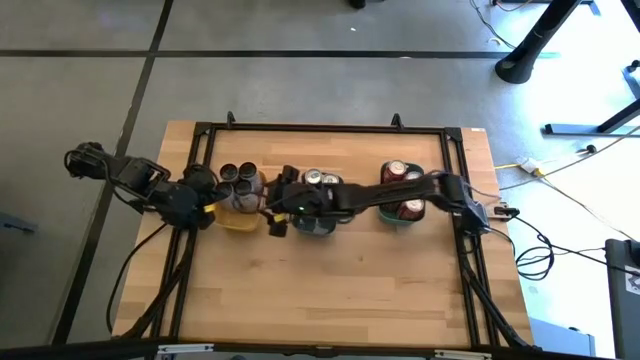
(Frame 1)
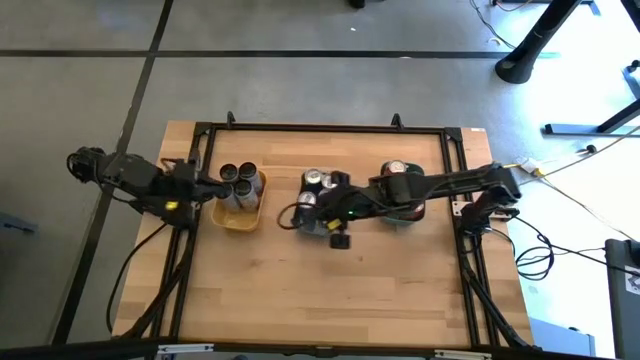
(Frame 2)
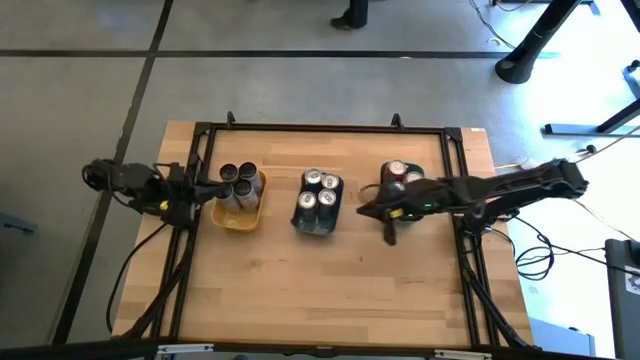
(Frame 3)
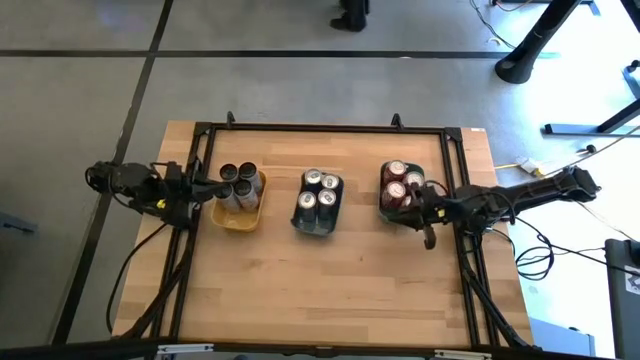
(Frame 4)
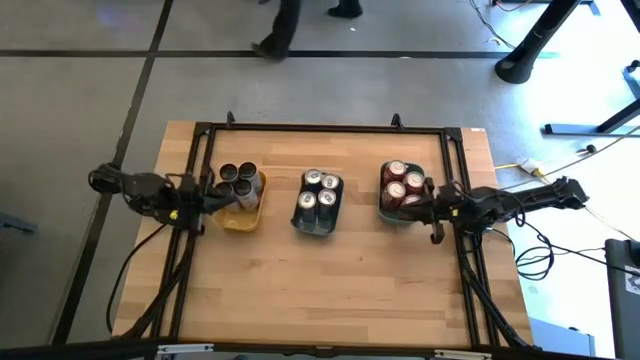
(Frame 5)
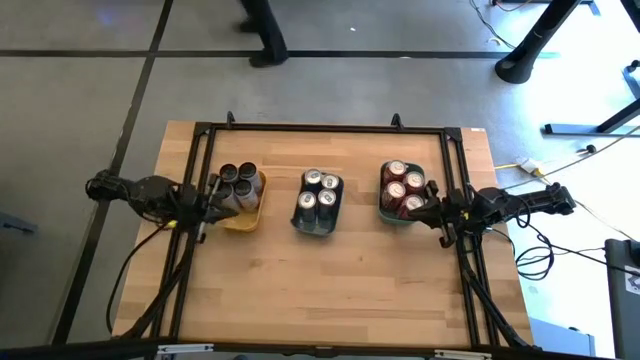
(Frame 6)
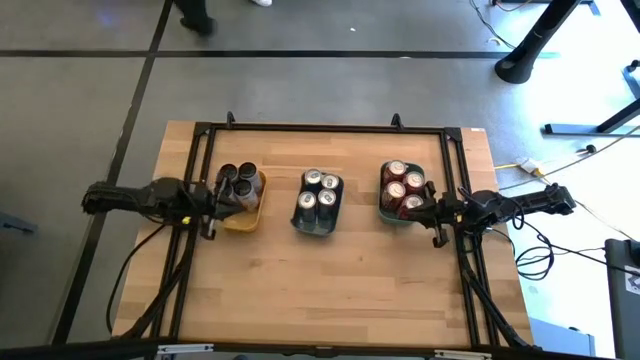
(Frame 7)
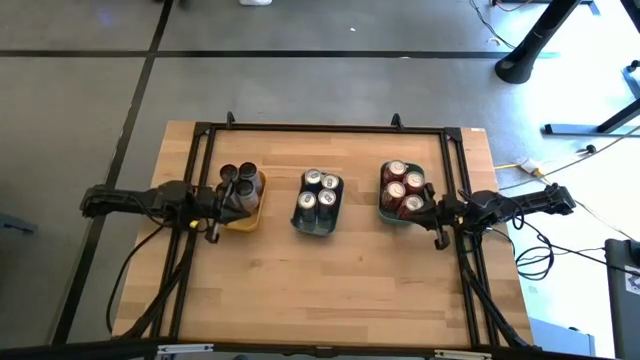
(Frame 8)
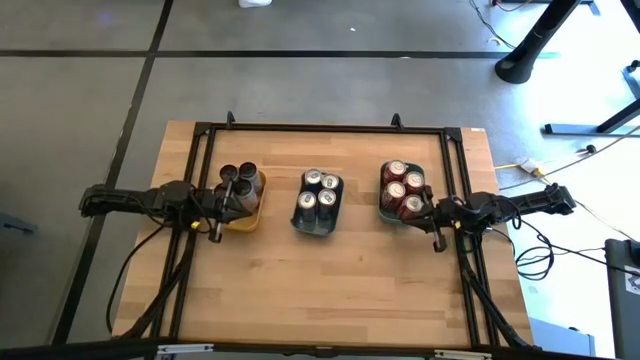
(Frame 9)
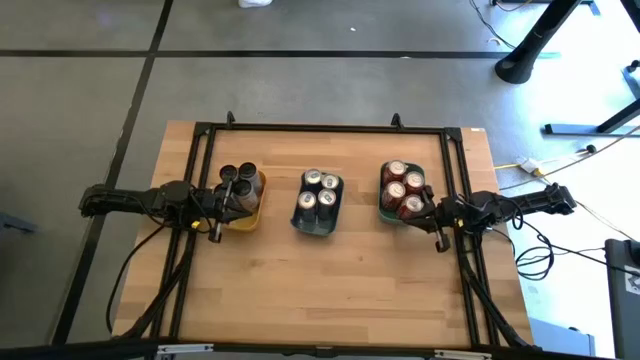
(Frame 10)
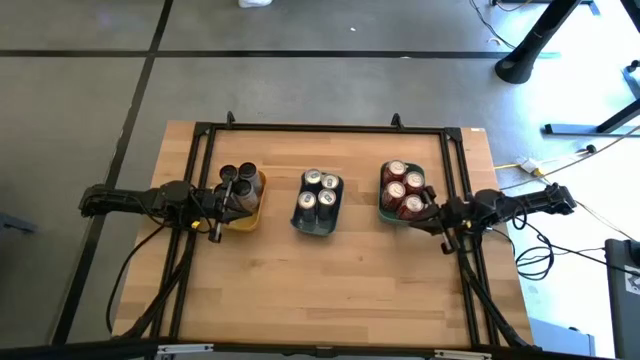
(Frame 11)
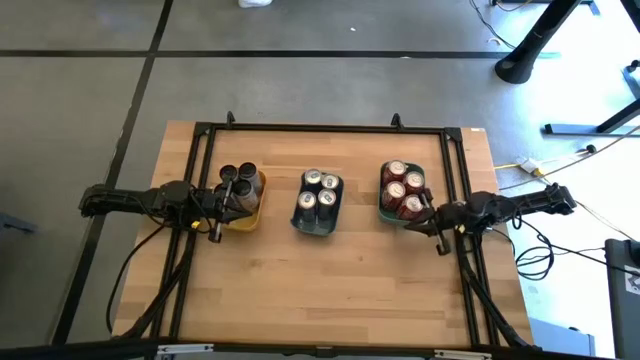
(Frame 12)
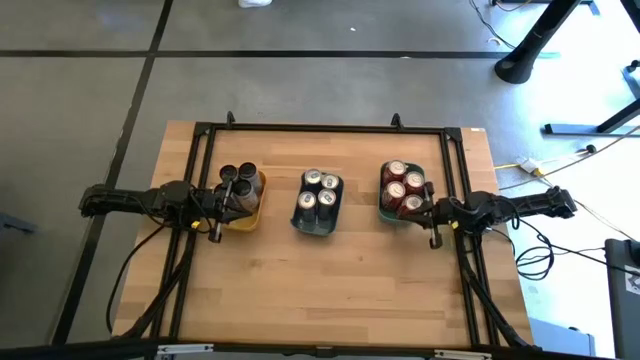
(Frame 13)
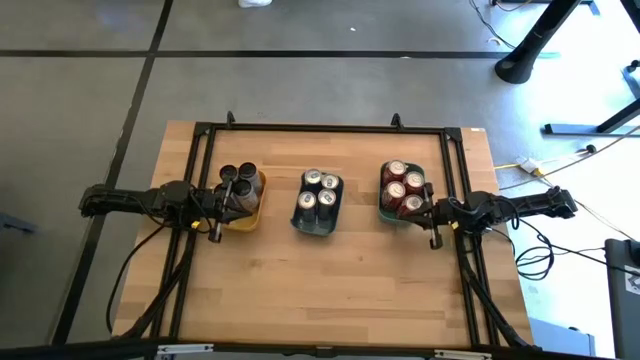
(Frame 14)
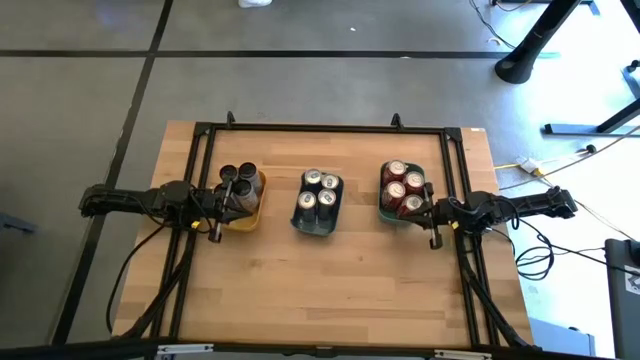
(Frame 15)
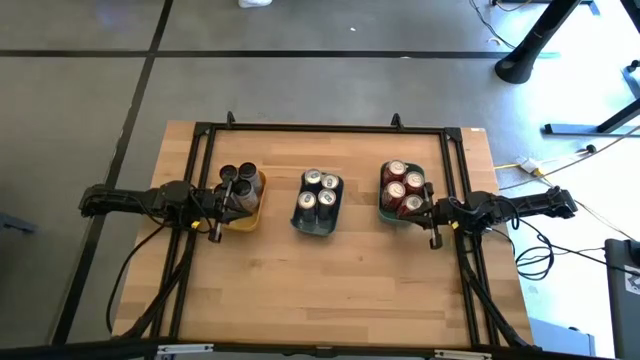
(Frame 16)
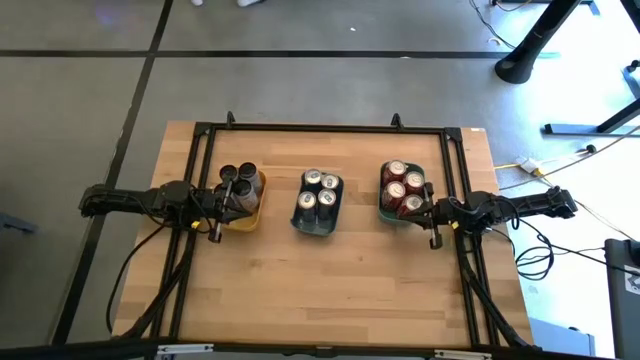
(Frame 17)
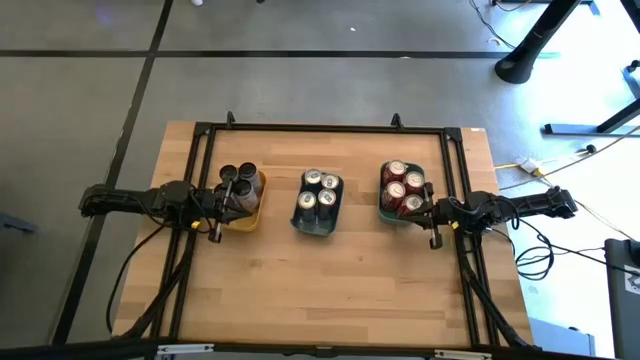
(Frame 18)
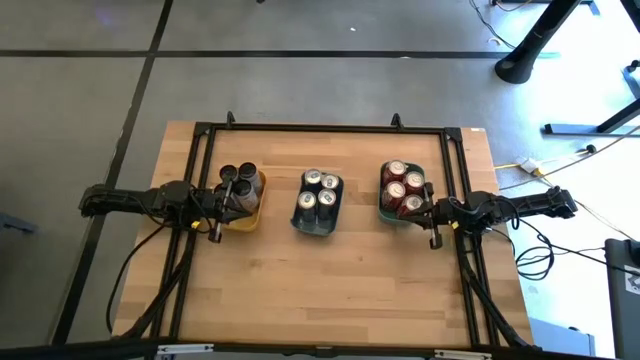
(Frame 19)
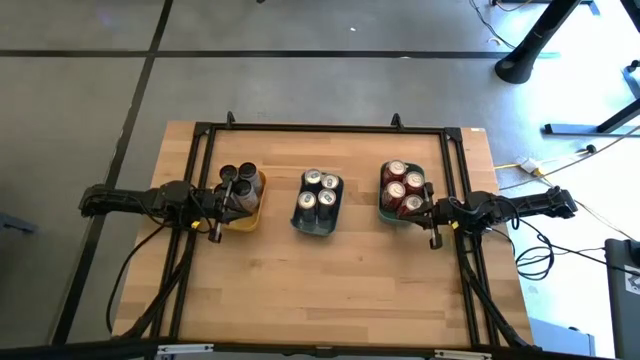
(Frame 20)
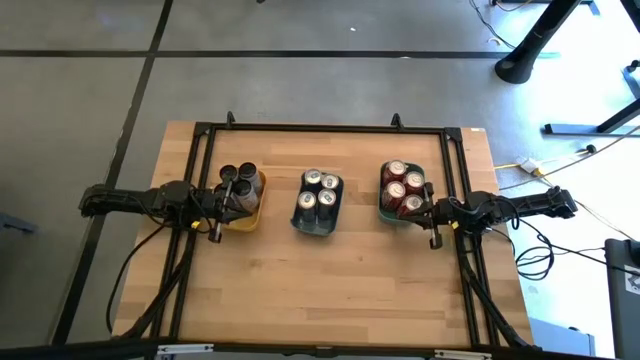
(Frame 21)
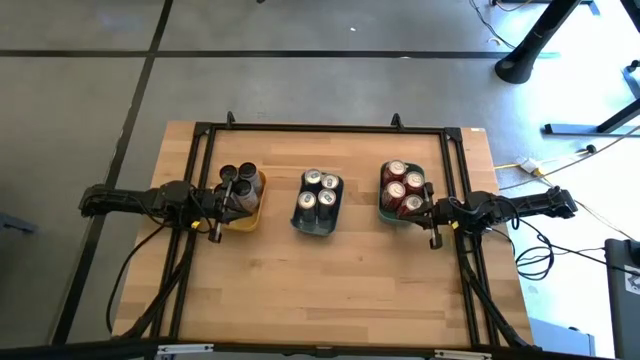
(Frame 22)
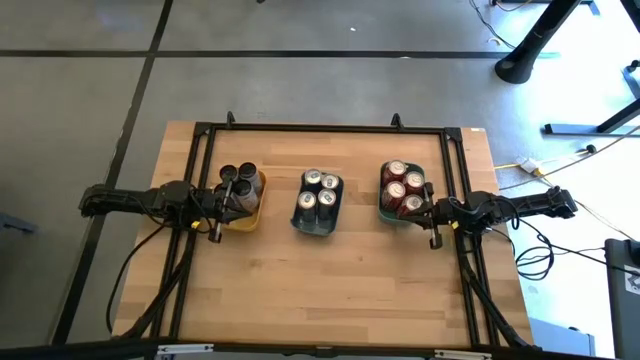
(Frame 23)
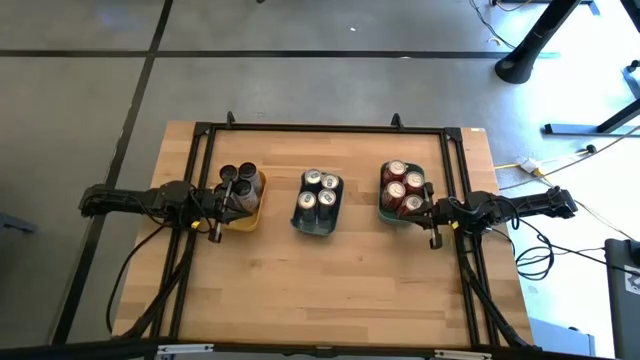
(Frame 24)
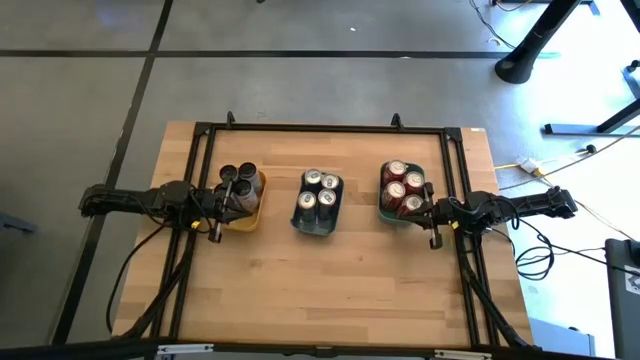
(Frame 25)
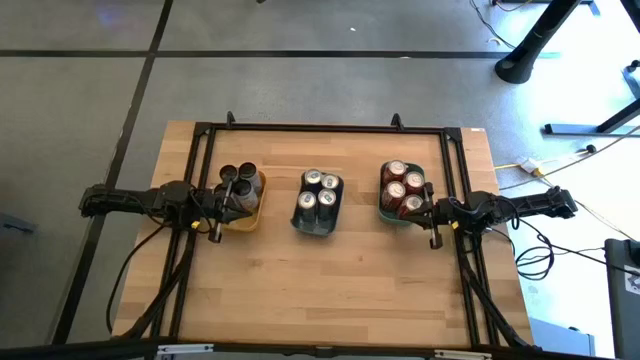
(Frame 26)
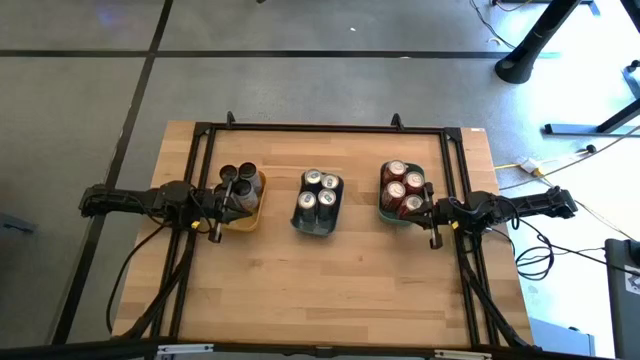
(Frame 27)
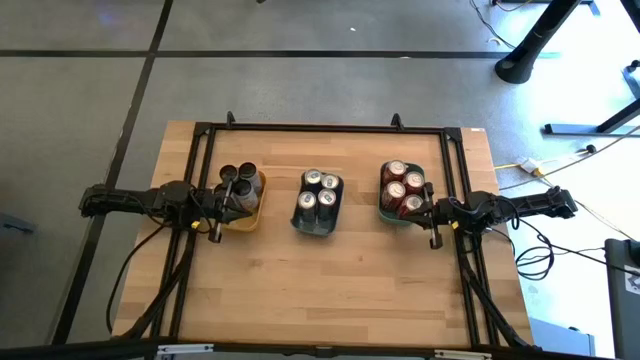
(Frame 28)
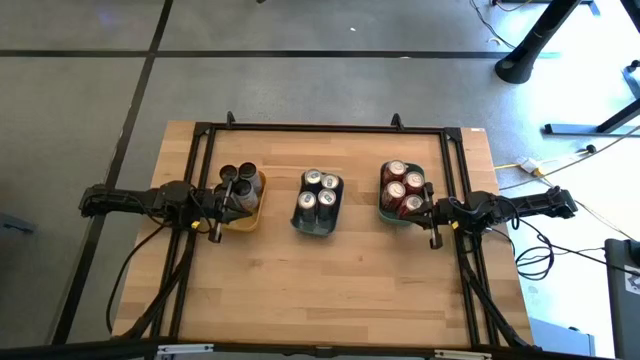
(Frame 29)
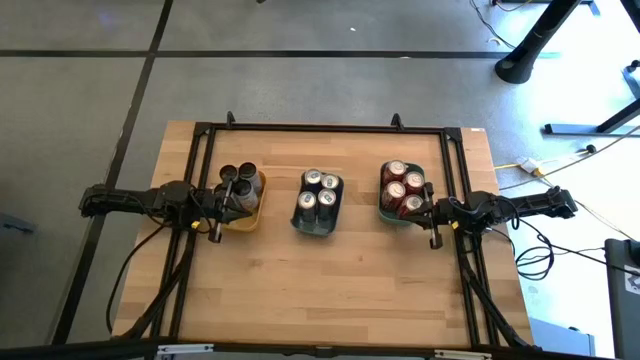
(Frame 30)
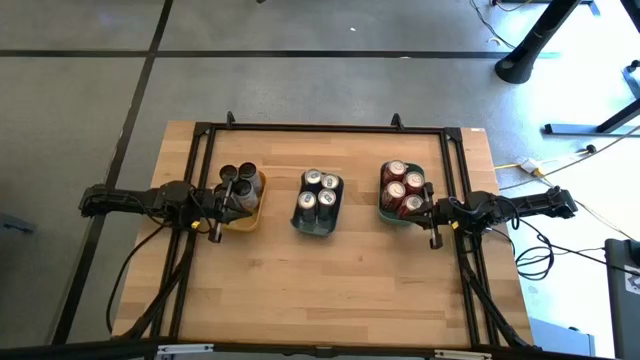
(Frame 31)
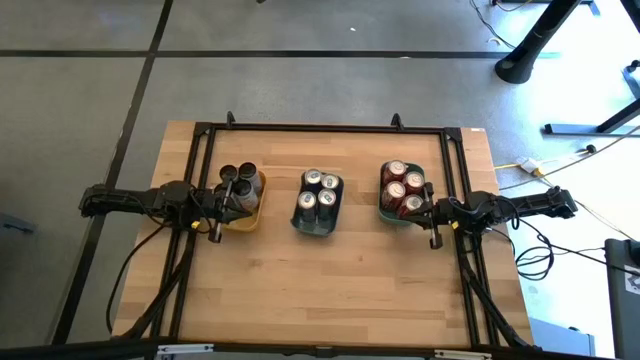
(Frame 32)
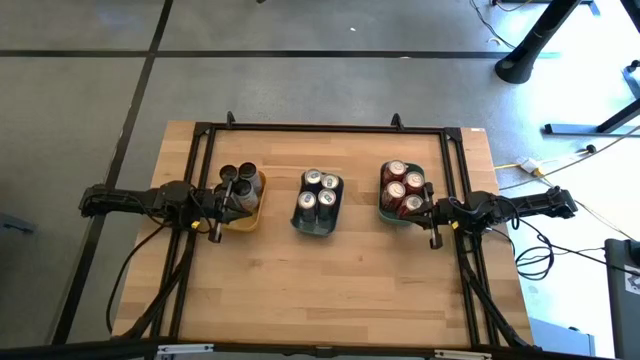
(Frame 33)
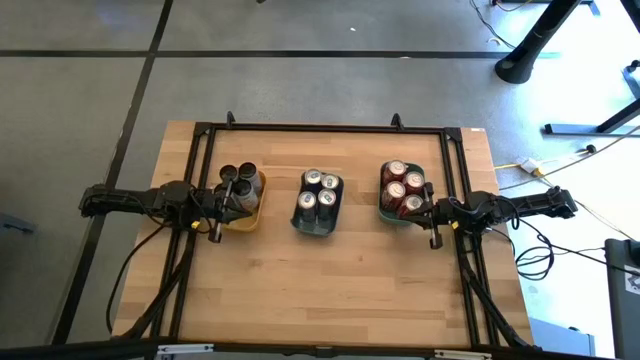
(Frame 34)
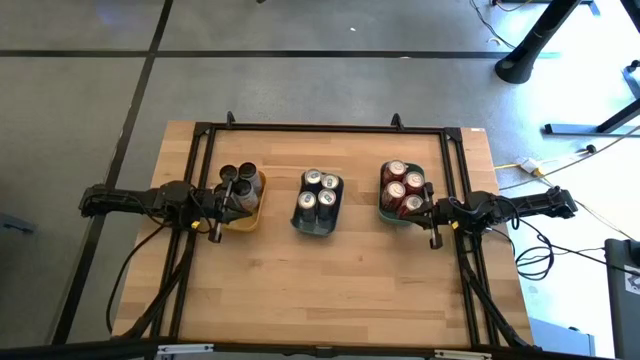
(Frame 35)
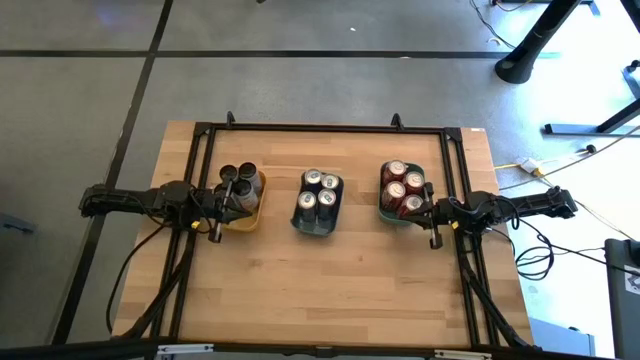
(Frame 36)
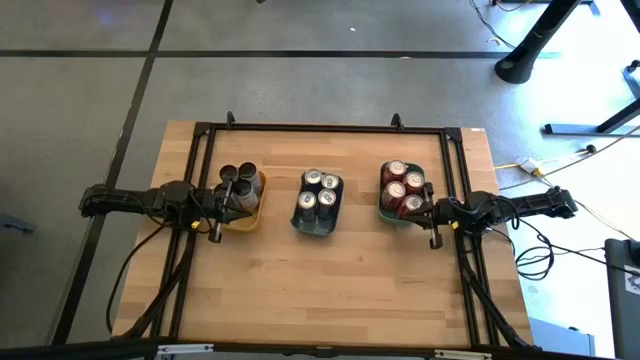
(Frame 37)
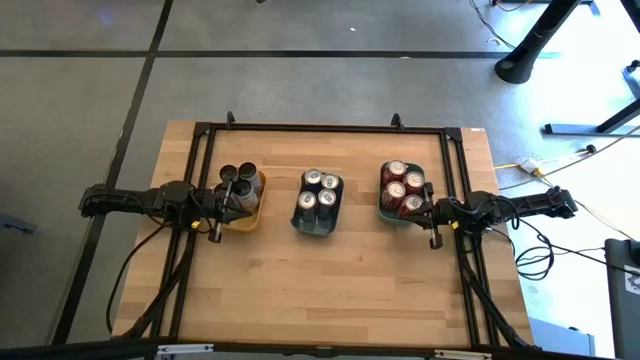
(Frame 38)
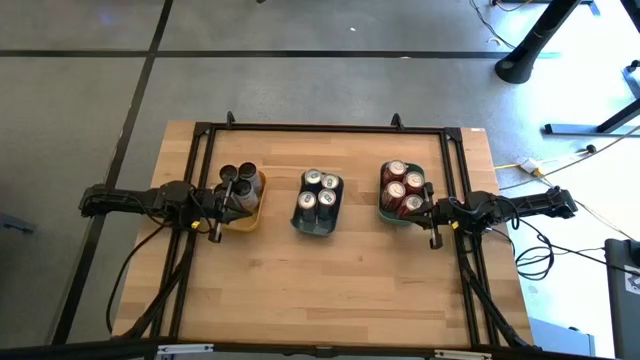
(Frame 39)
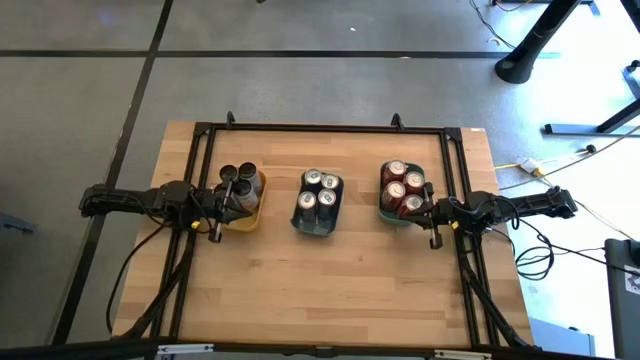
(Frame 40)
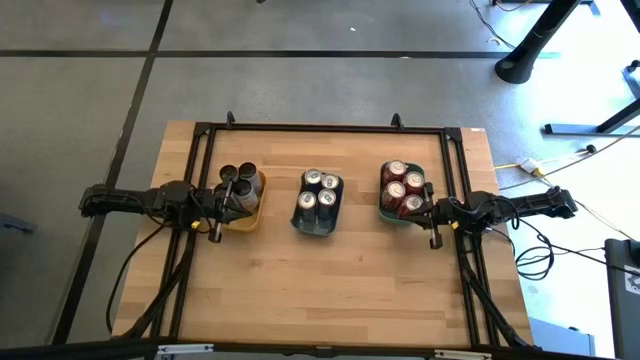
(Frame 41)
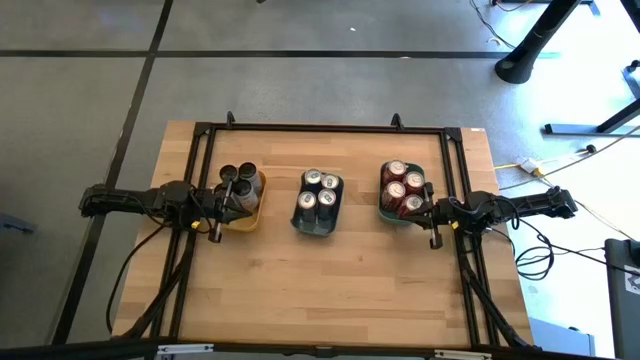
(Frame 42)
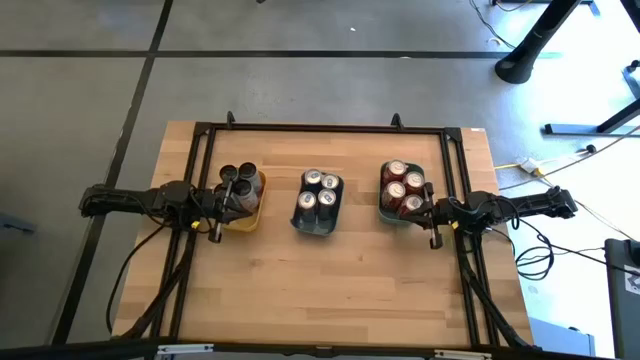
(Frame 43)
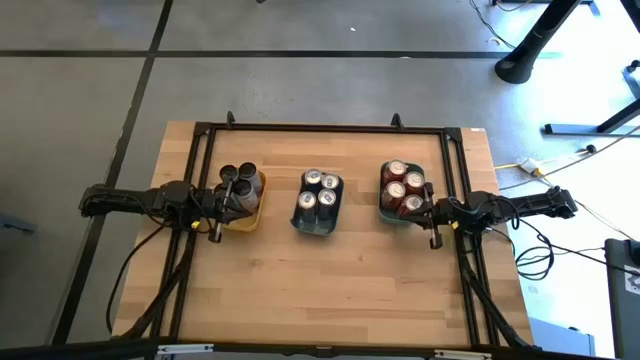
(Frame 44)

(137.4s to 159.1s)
Task: Sort soda cans
Return to Home Position

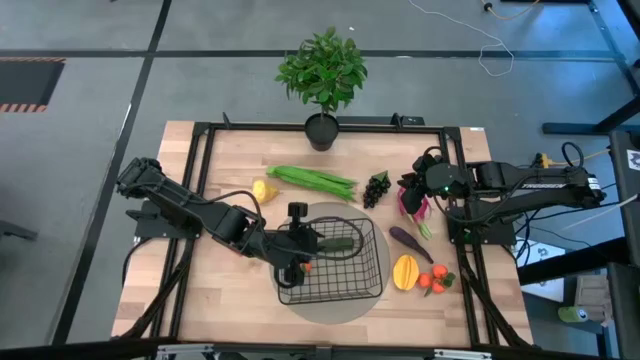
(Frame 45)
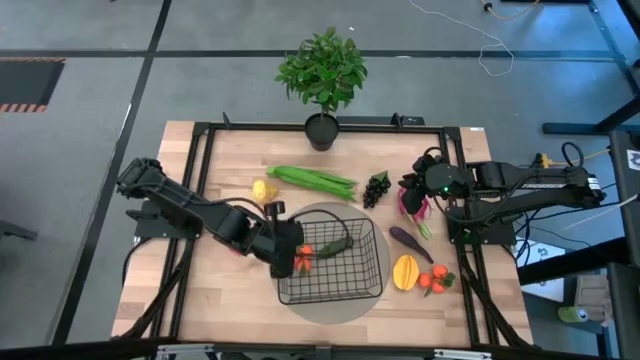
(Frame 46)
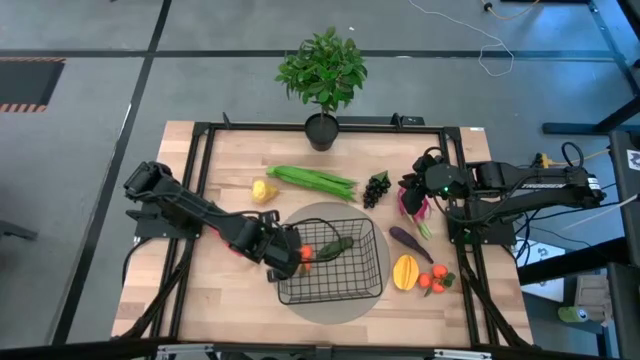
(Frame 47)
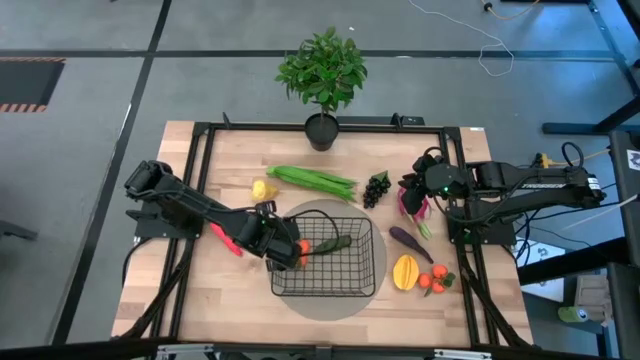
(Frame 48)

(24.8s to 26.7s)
Task: Build produce basket
Adjust the black wire basket
